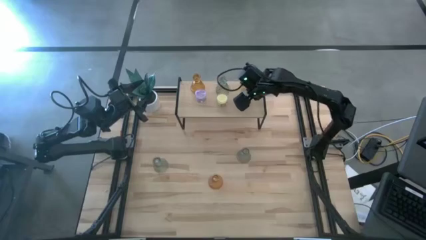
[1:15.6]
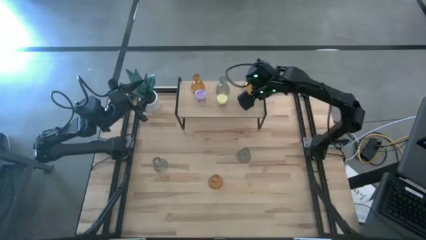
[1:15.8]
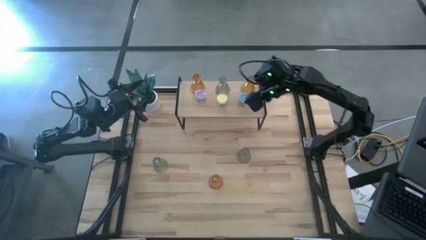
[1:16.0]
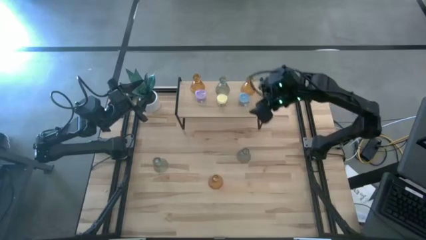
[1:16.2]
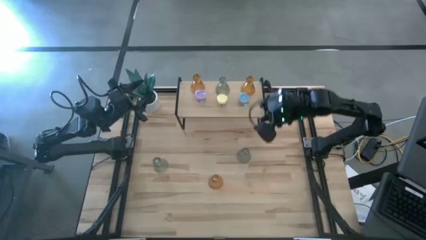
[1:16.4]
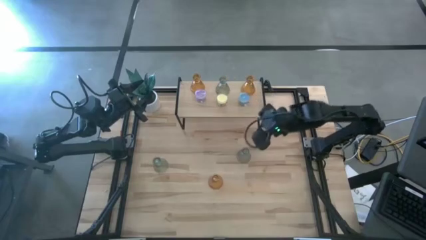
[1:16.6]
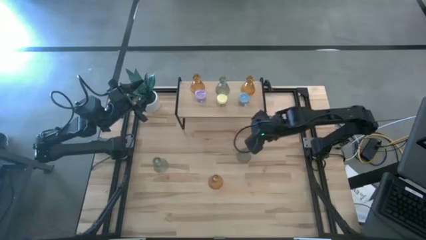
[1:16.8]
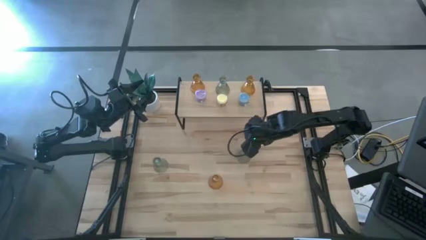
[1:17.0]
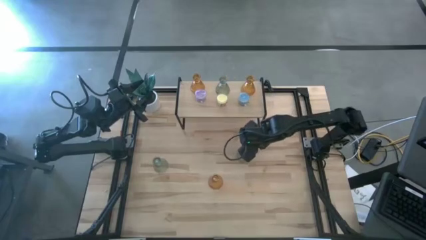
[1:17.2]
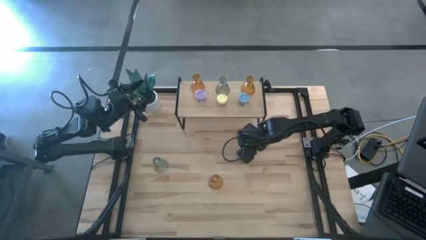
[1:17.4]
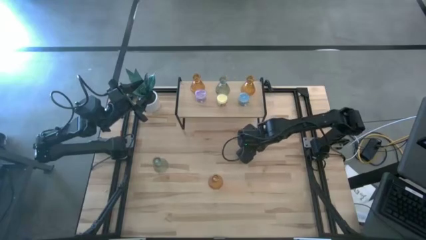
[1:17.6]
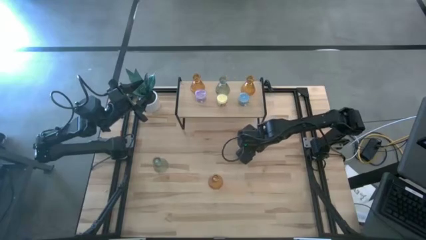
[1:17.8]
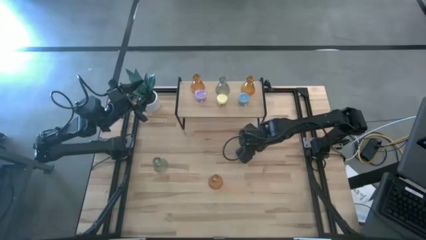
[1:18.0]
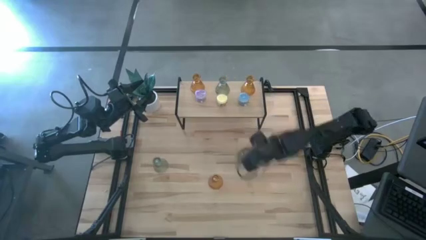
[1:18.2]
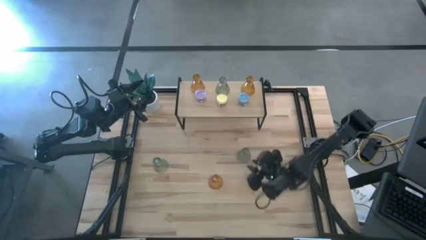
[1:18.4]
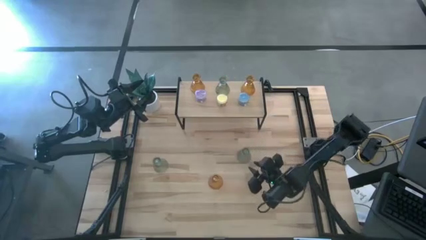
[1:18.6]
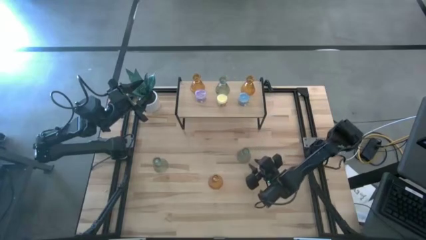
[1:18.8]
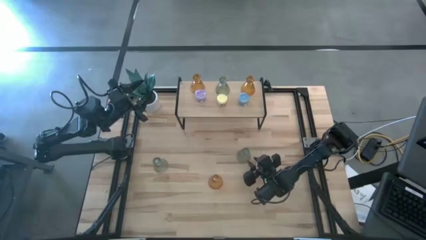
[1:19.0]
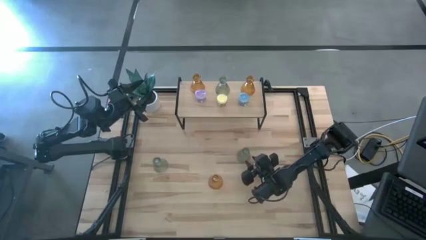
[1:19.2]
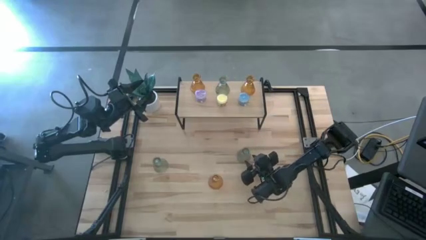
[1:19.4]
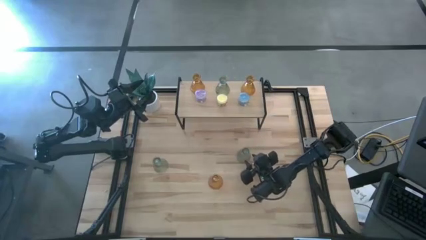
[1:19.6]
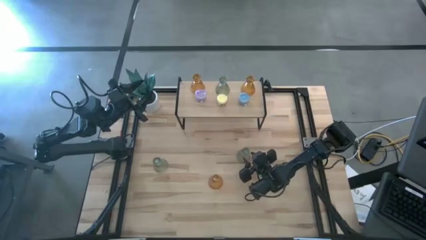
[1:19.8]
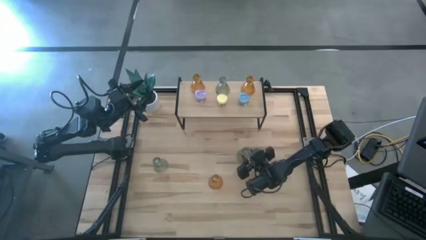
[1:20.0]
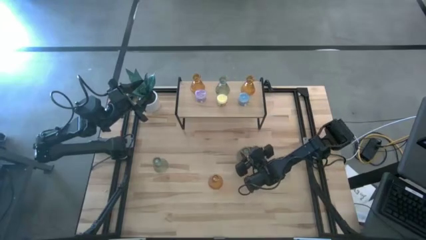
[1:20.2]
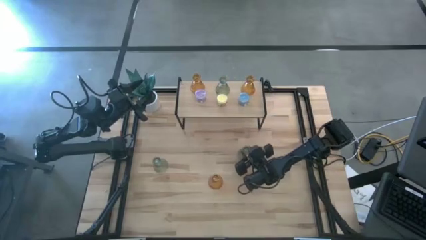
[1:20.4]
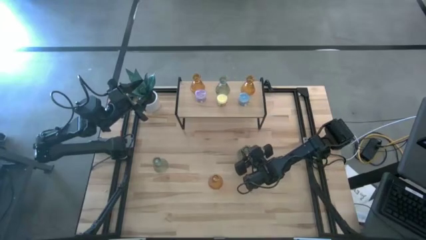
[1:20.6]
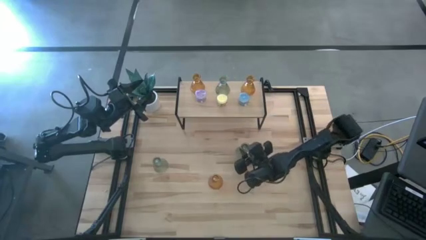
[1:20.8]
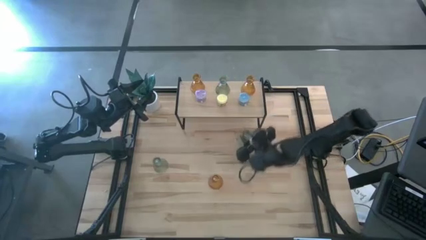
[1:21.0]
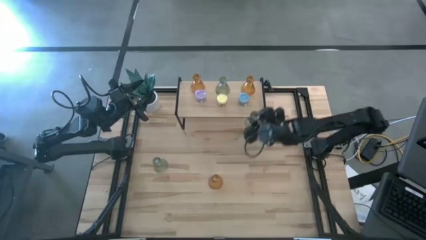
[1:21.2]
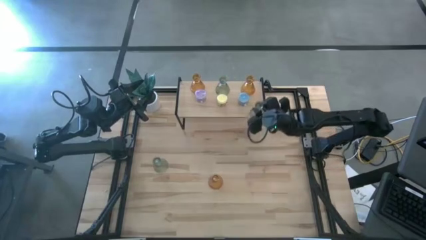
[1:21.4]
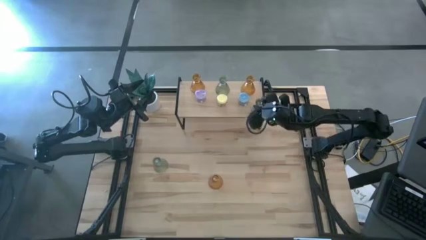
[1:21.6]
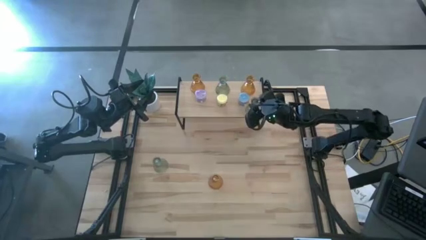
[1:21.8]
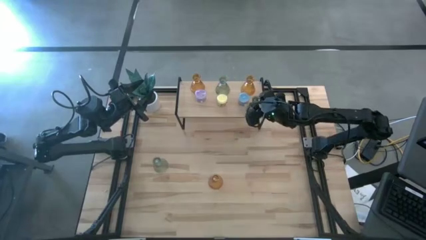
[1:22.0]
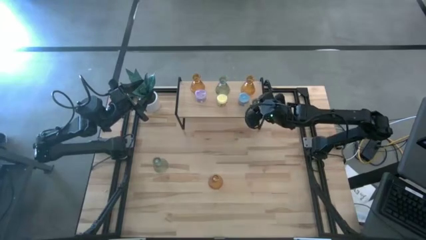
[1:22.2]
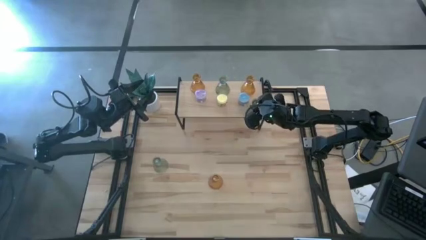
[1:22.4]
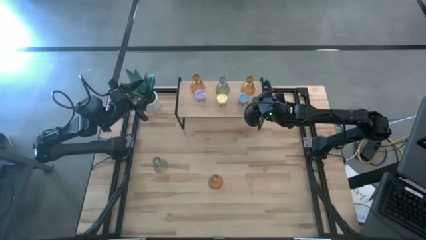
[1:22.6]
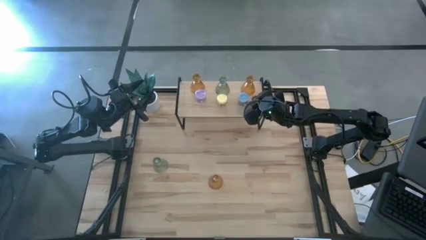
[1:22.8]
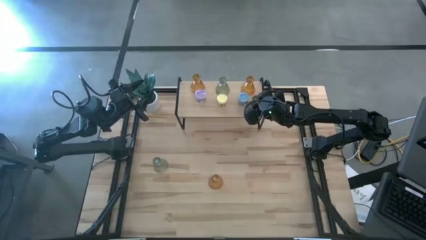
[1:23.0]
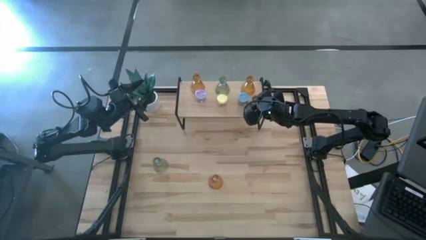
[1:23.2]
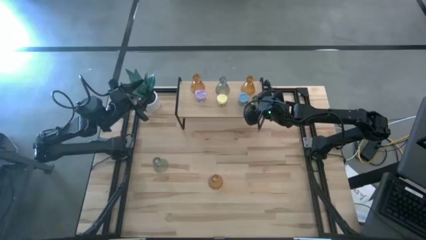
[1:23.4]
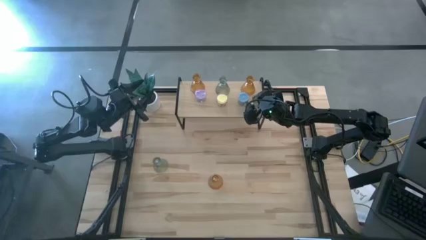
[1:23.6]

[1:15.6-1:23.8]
Task: Pick & Place candle stick holders
Put the right green glass candle holder on the shelf

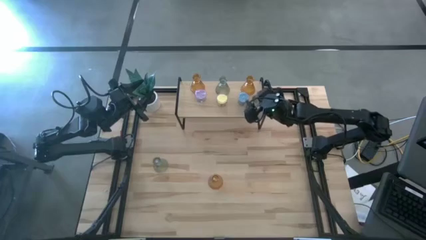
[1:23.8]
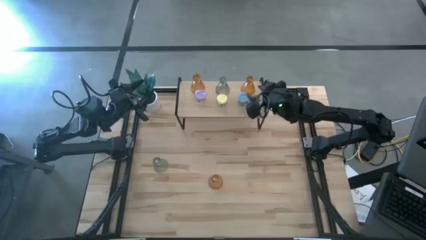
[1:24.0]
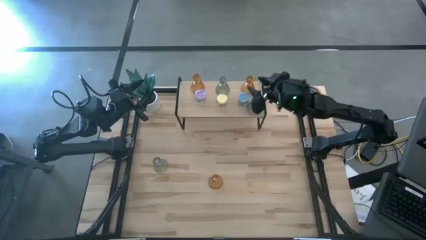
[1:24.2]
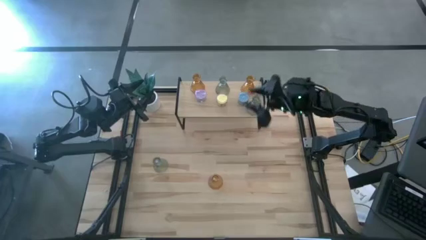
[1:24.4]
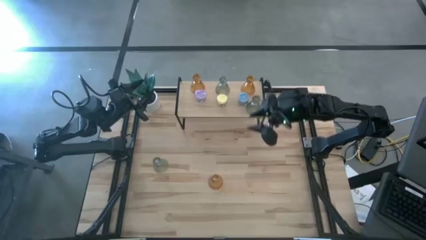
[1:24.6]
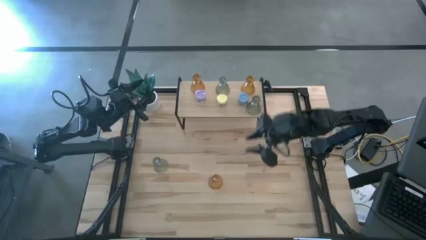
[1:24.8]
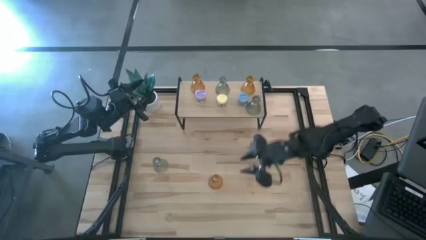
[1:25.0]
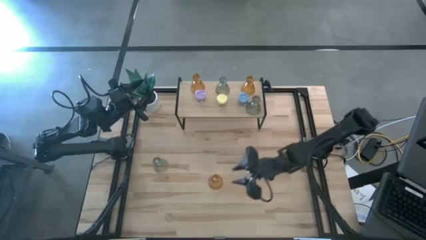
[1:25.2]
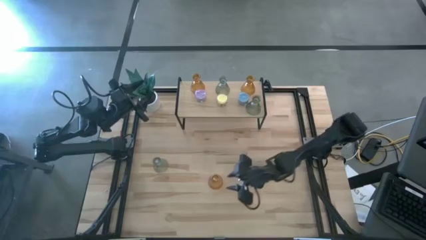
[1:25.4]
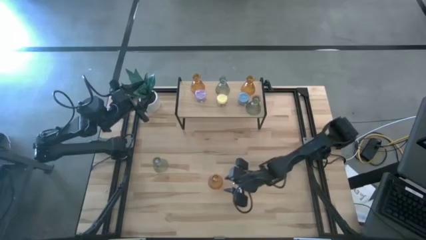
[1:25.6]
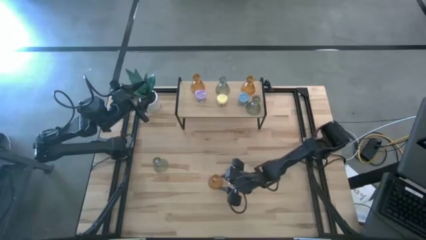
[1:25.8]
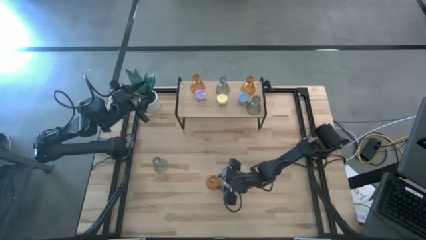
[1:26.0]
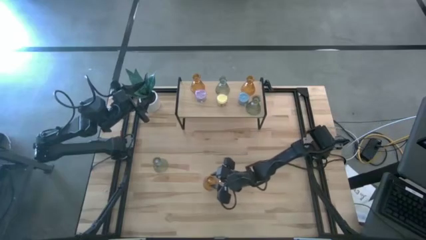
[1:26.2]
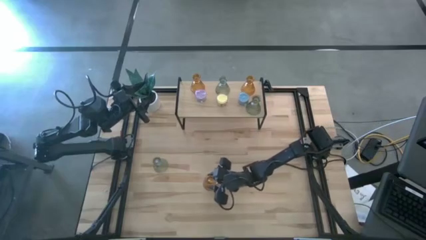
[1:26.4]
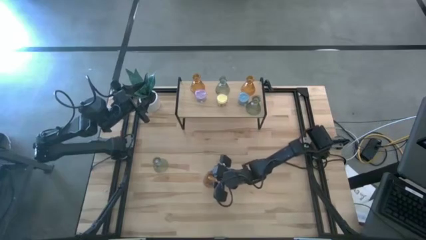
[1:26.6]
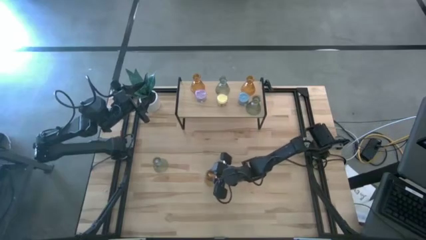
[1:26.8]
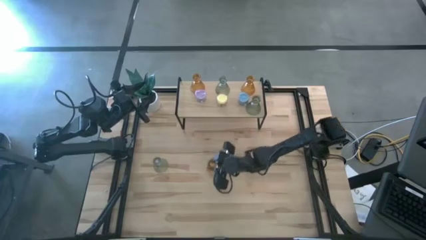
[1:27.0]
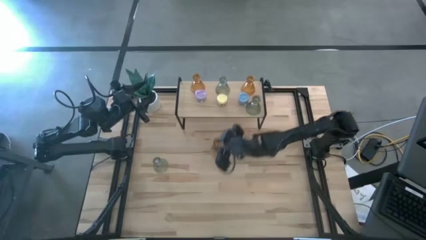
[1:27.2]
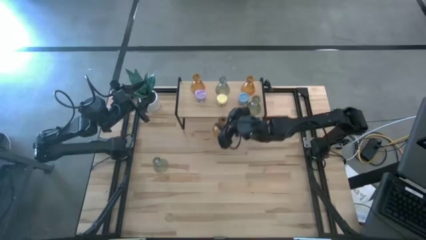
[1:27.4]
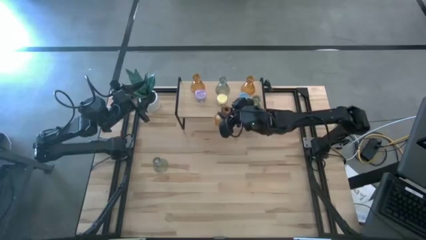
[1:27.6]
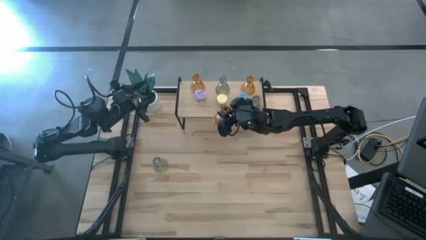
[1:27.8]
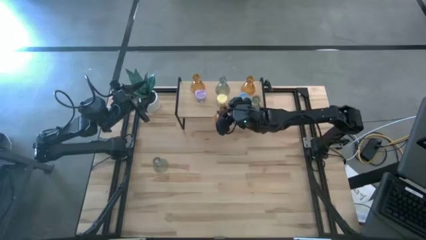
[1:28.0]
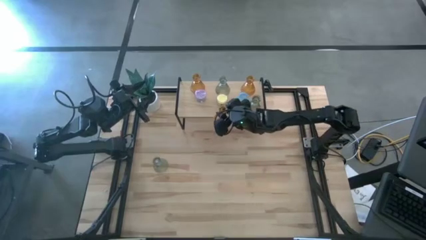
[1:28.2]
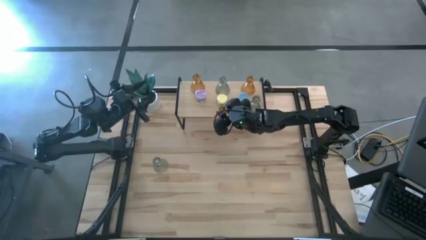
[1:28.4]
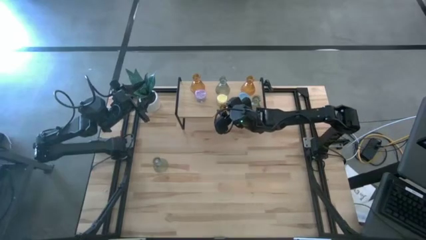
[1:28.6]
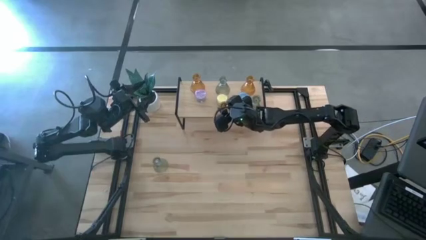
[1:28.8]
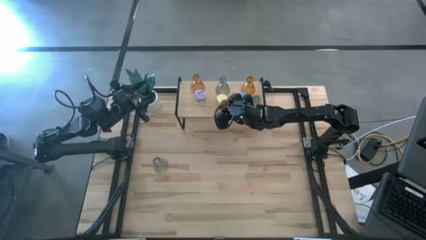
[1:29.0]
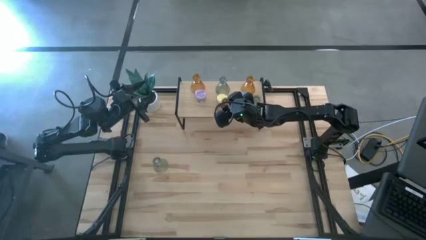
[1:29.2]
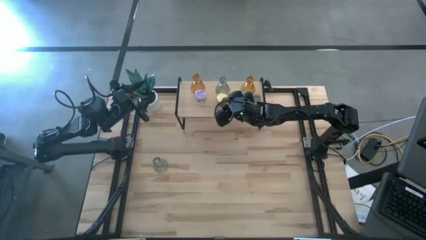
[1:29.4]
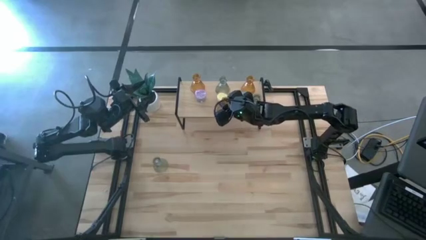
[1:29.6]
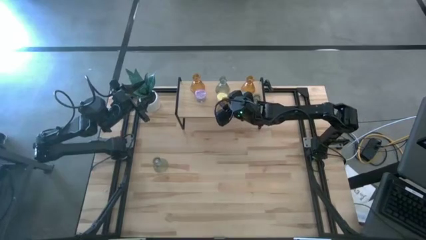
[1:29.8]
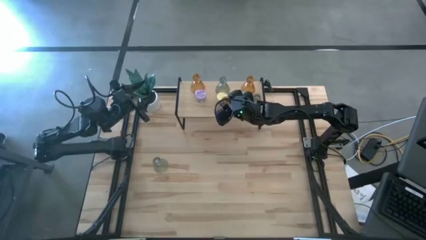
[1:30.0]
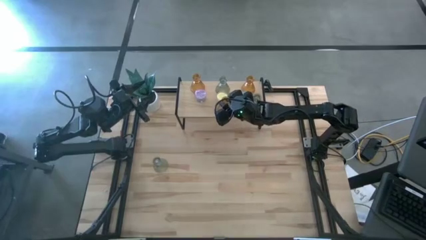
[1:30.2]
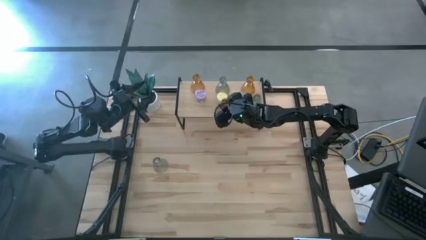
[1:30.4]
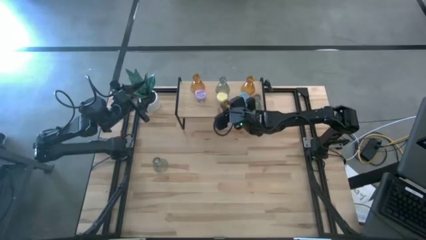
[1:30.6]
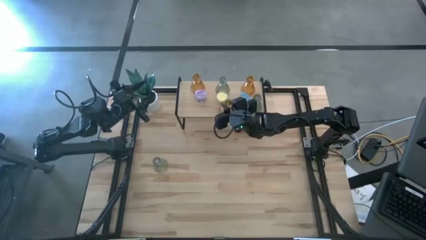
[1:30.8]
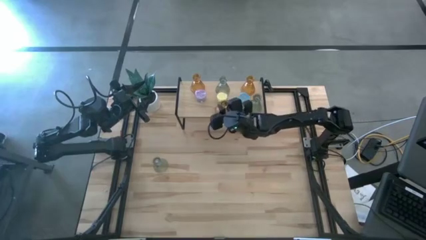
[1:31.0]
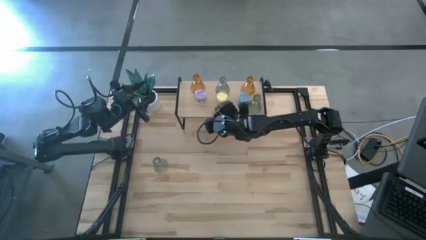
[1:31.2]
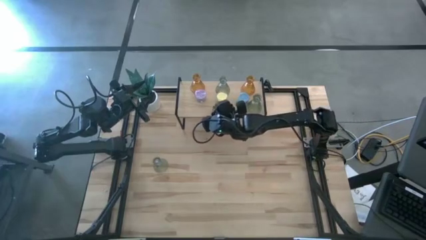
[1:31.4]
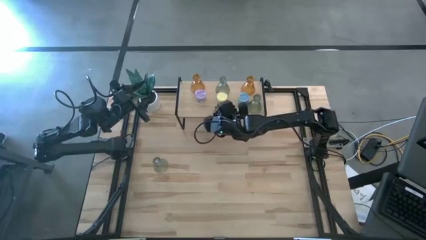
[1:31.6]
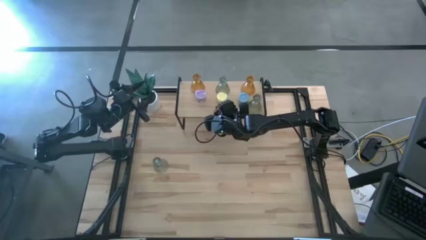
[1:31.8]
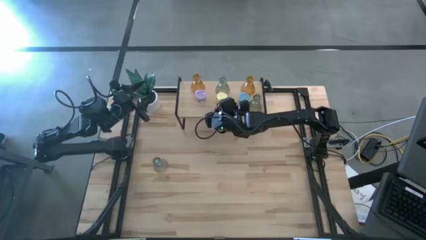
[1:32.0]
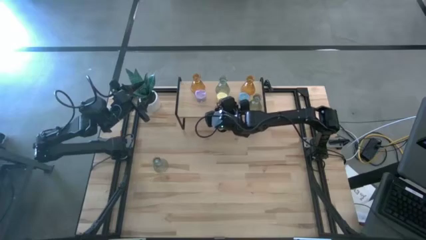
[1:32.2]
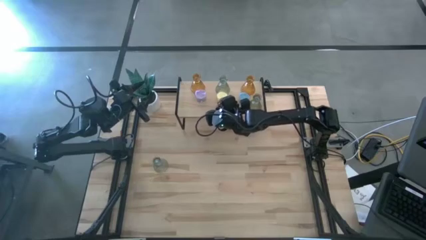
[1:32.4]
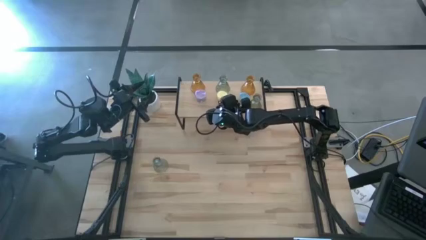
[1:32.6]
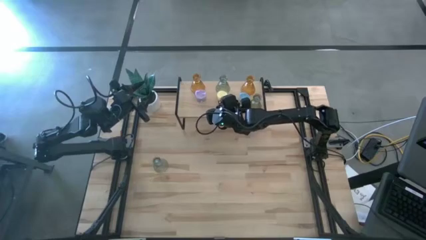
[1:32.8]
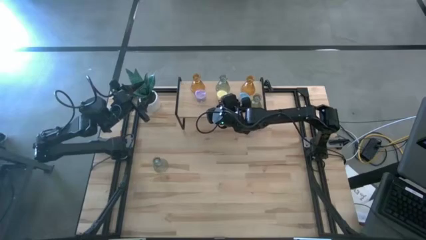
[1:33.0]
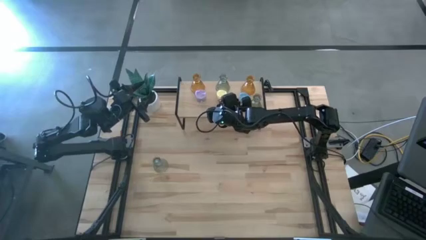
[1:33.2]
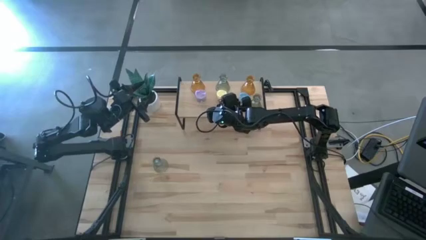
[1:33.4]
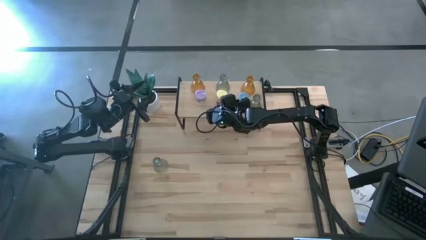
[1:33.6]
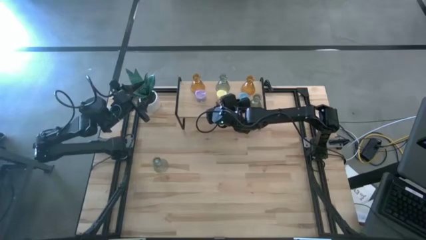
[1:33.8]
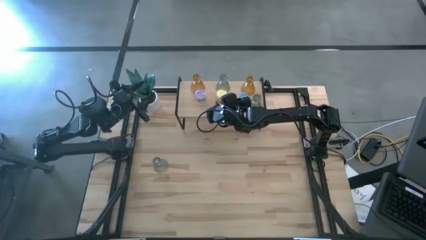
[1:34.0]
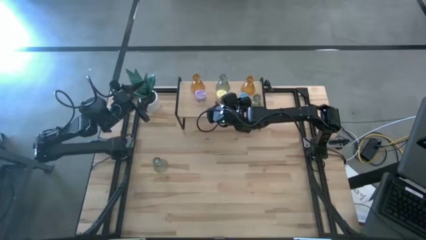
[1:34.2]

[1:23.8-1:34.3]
Put the brown glass candle holder on the shelf
